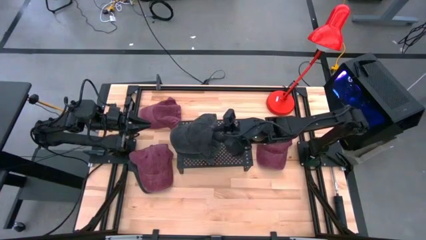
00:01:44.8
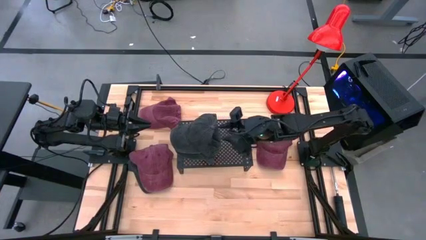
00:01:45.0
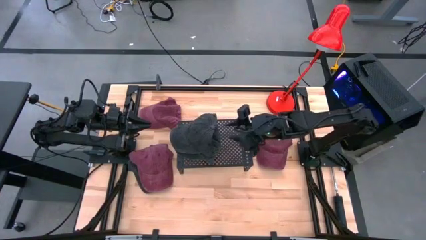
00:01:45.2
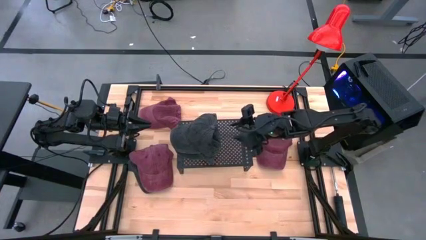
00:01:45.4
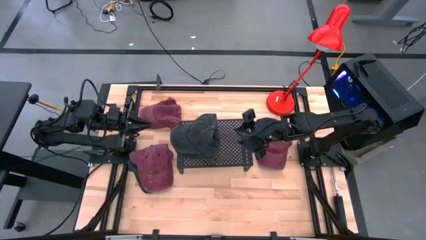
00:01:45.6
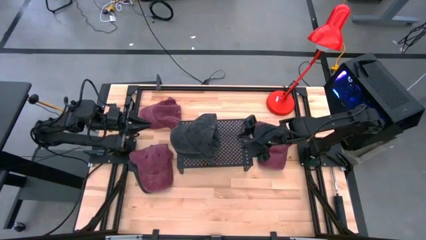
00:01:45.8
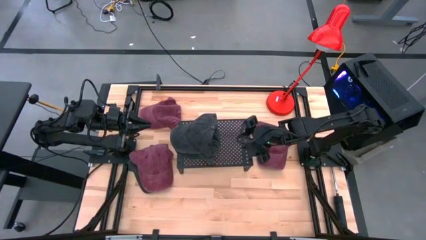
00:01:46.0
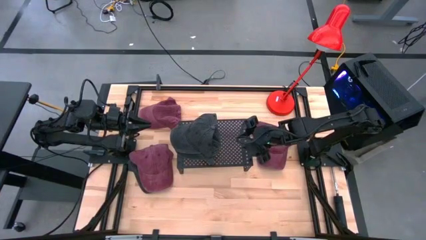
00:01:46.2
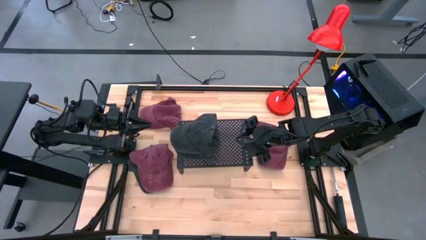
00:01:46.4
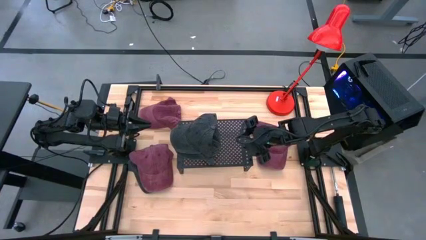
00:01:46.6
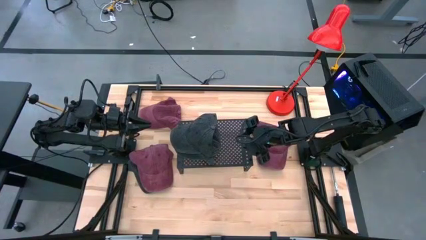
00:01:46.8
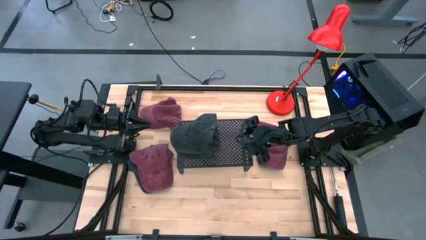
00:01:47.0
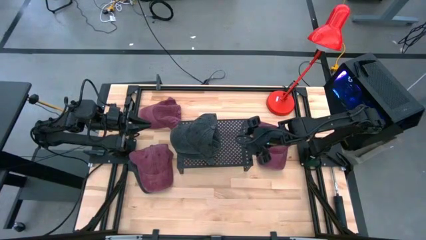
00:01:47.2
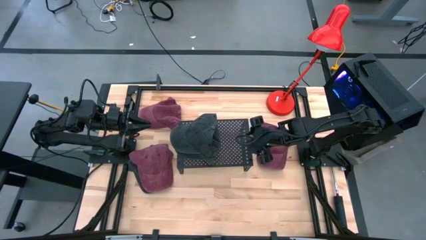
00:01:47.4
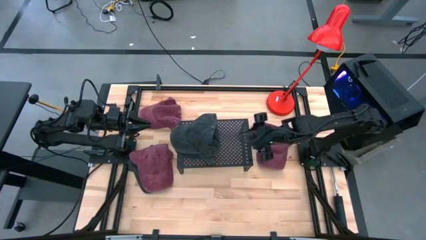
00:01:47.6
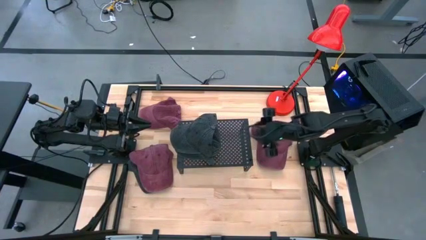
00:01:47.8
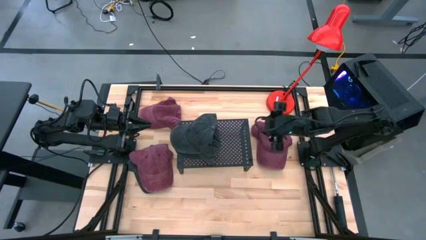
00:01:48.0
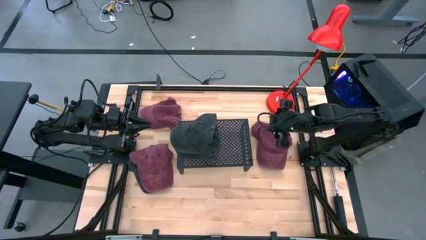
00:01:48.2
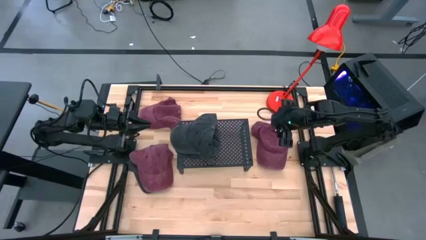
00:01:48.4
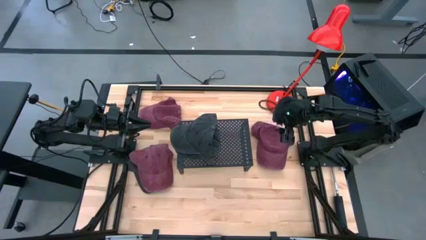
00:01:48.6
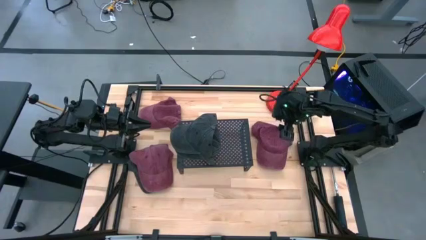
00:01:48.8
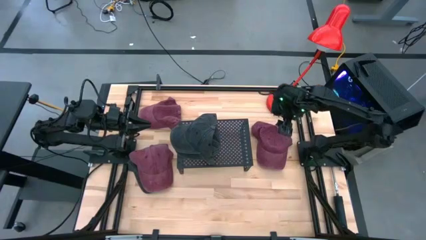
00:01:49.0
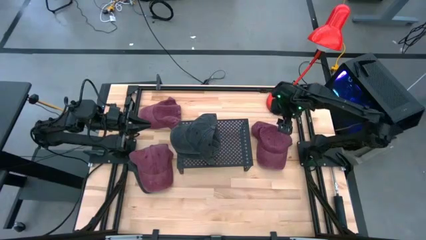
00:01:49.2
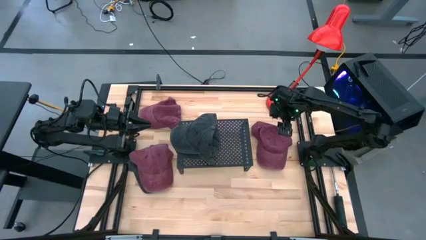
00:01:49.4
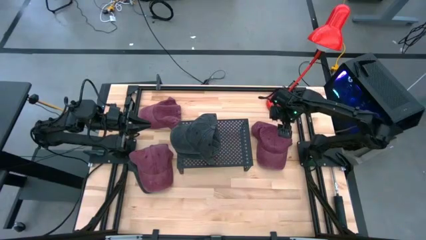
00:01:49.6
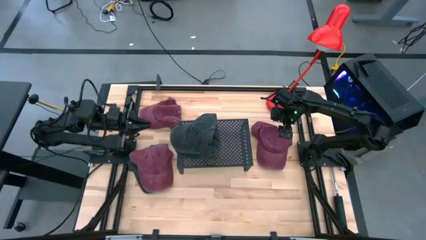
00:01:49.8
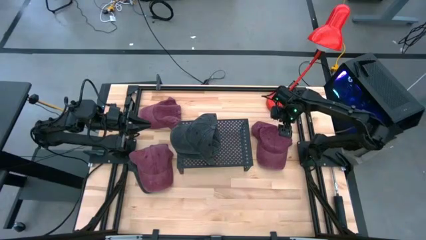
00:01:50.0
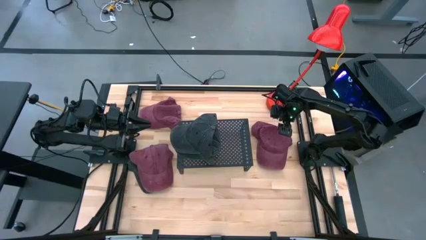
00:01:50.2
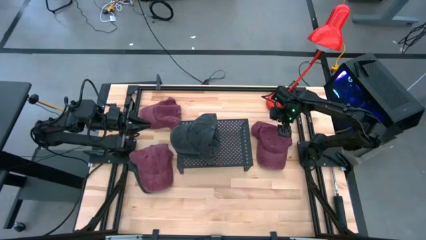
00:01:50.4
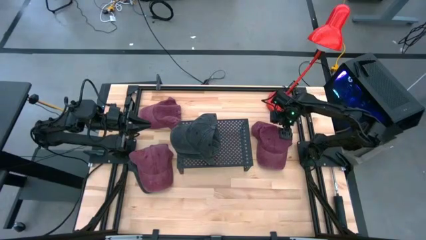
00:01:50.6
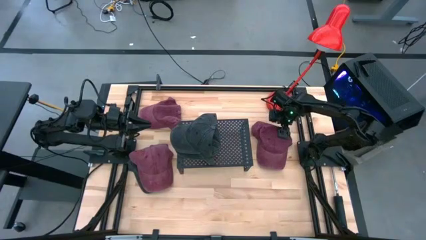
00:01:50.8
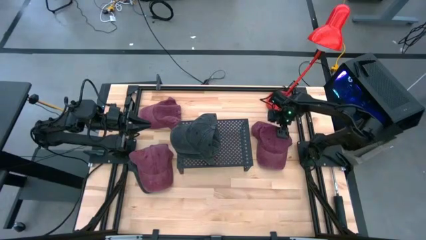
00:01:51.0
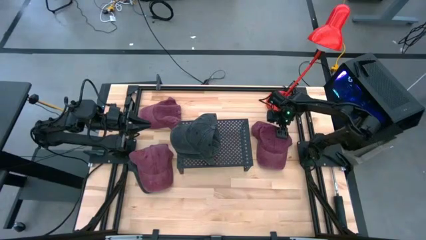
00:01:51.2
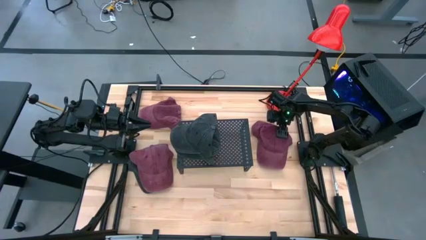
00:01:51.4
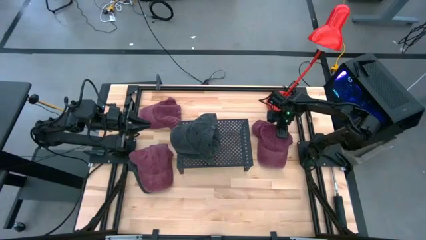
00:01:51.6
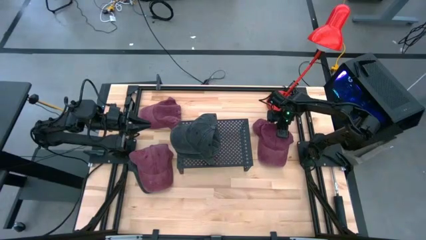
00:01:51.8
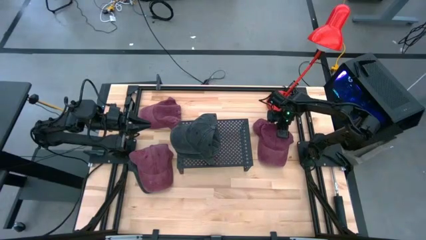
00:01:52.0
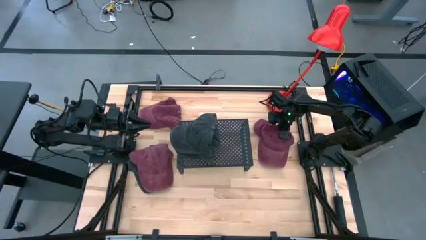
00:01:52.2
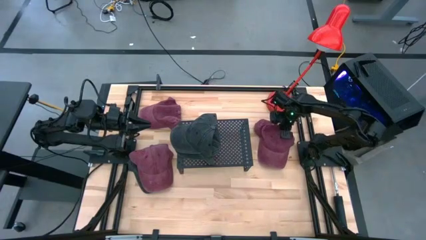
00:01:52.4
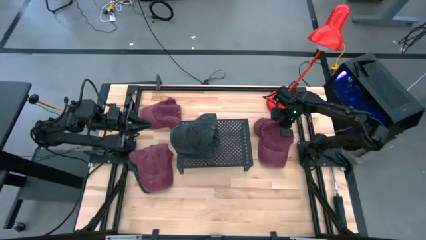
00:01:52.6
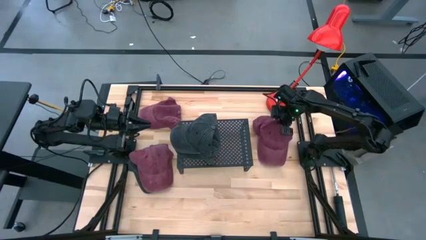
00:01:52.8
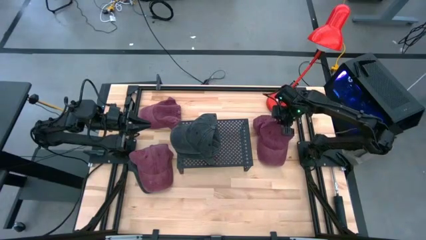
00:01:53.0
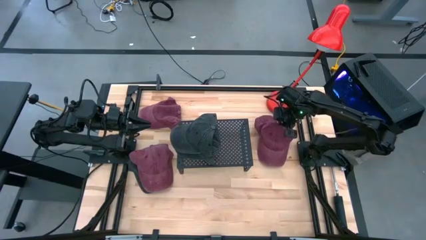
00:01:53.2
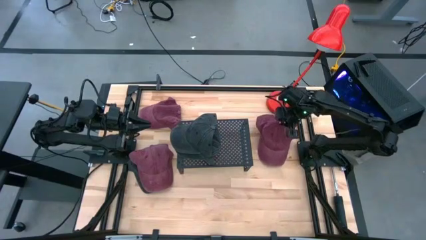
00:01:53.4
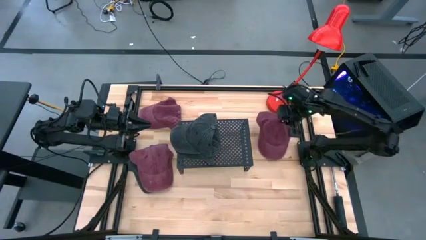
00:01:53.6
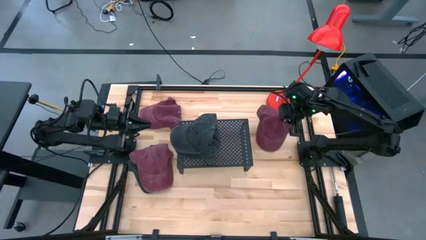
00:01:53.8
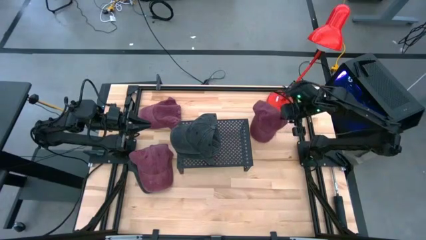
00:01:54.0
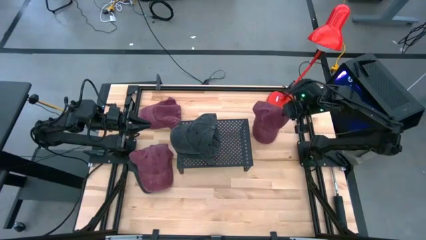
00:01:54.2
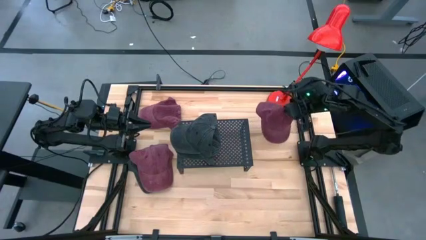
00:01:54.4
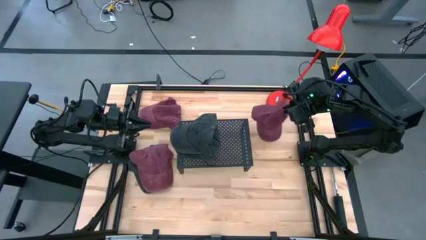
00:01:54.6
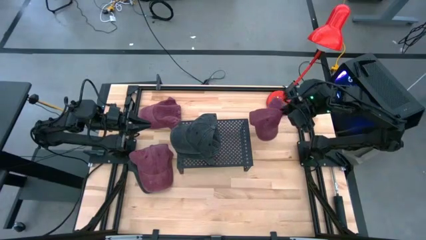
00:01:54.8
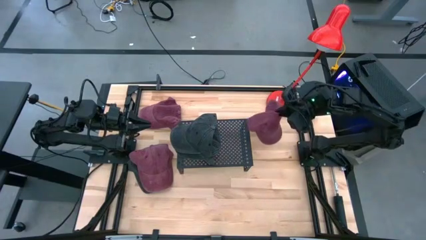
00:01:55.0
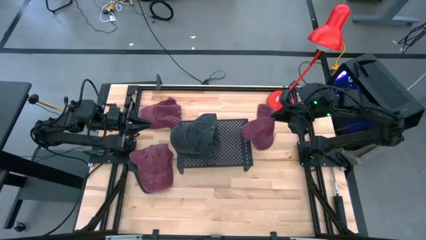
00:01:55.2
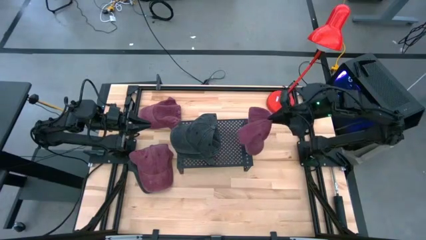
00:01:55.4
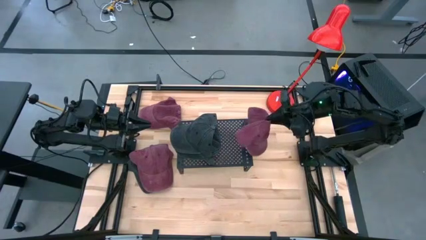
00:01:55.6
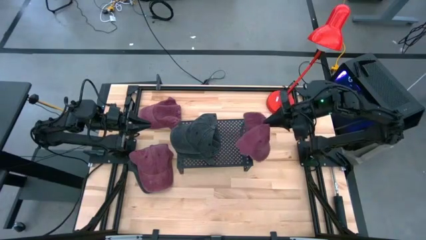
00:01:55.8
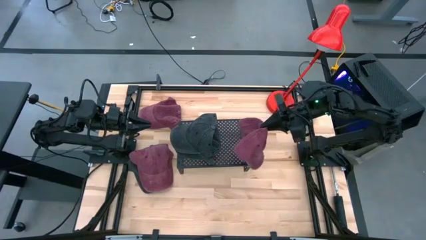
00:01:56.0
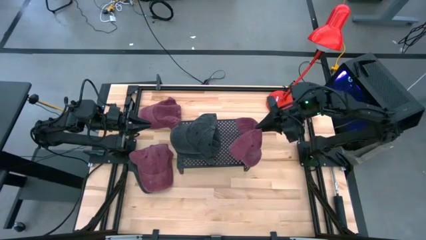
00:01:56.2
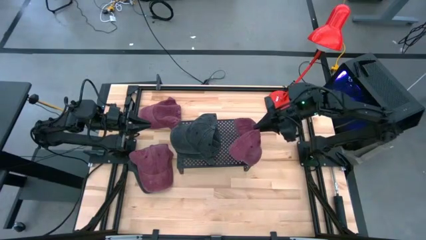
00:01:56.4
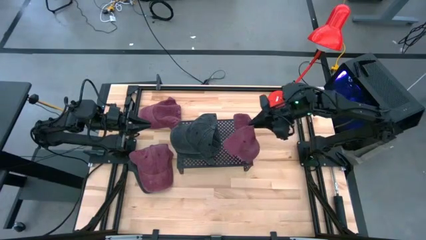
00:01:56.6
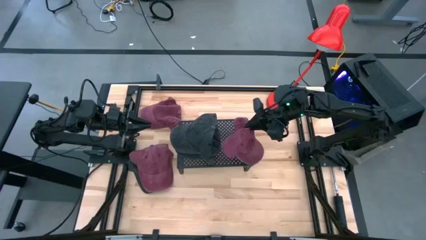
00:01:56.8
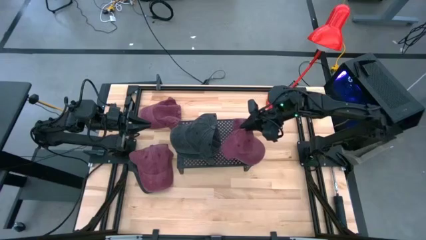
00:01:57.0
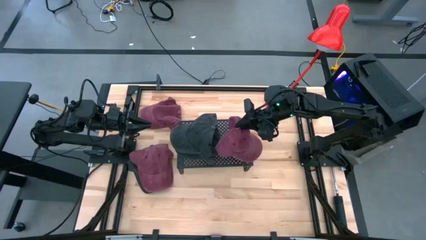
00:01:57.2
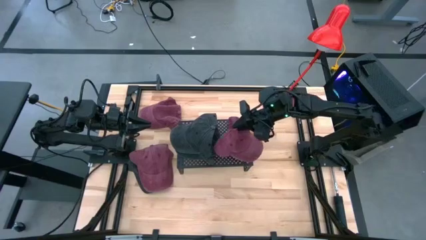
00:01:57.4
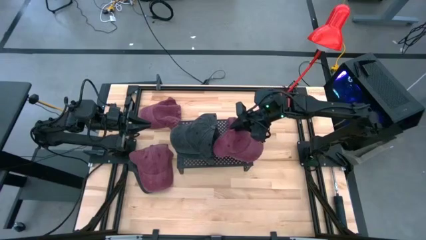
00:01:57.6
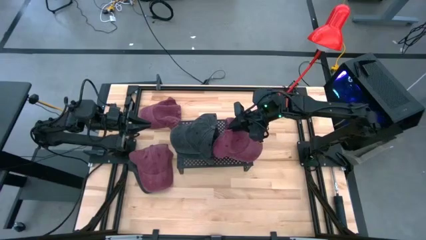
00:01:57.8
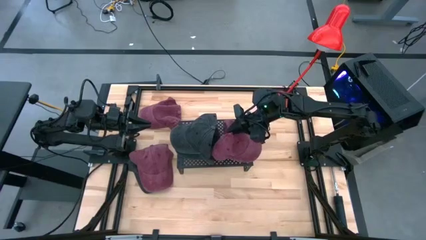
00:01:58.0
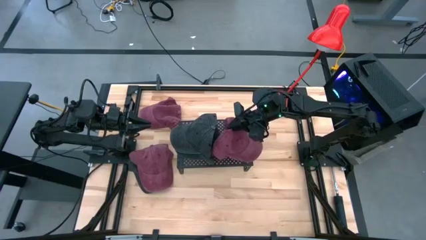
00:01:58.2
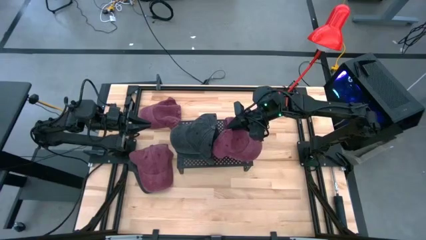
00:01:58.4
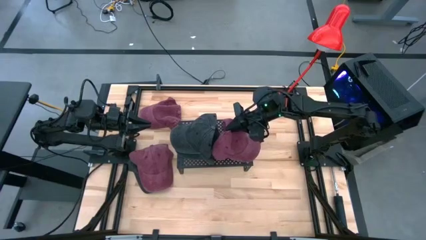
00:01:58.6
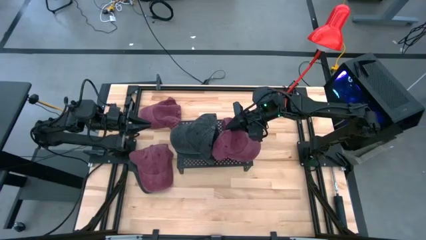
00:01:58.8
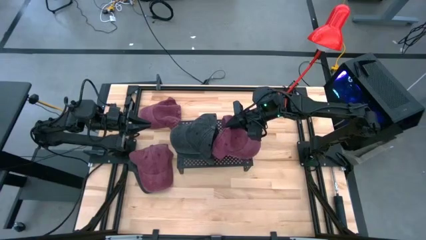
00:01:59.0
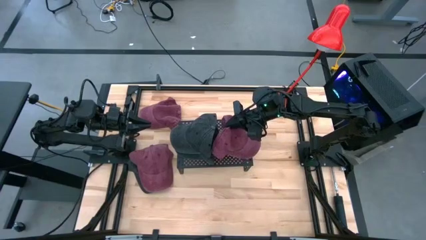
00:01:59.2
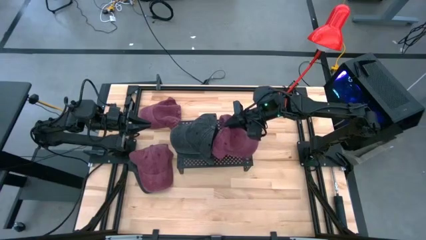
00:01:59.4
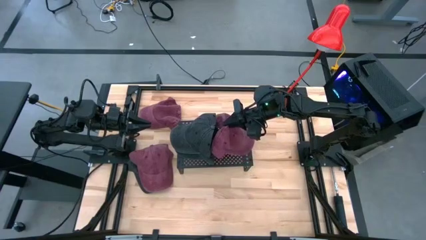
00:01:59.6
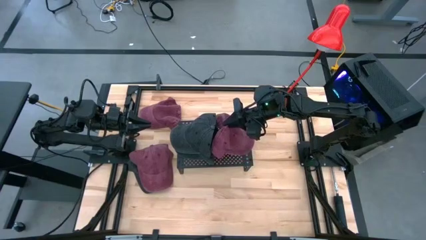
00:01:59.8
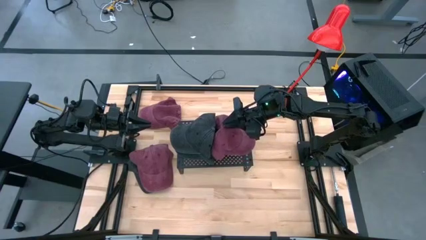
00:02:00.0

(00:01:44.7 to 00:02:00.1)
Task: Pick & Place hat
Put the right red cap on the shelf

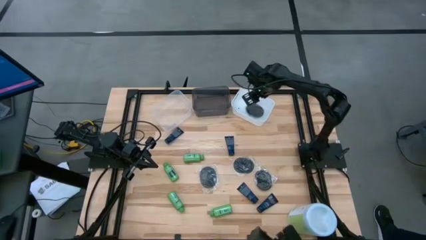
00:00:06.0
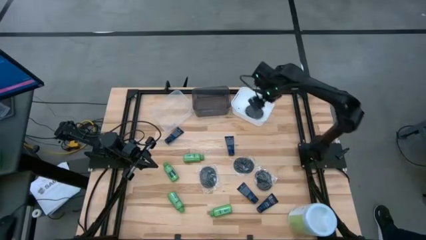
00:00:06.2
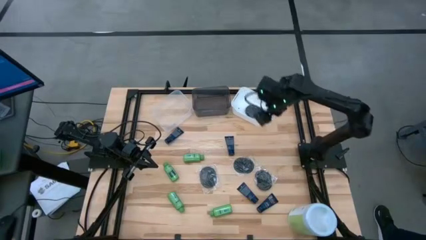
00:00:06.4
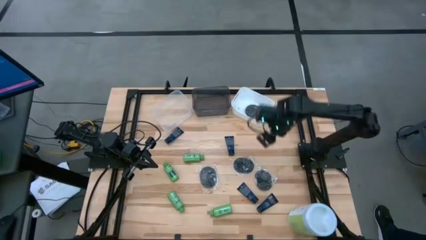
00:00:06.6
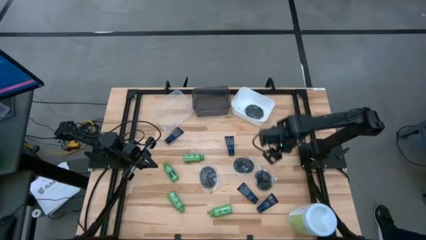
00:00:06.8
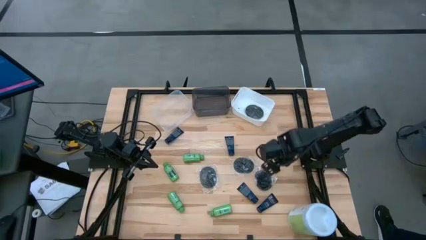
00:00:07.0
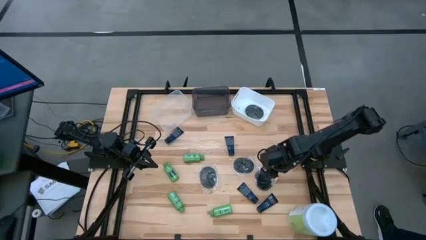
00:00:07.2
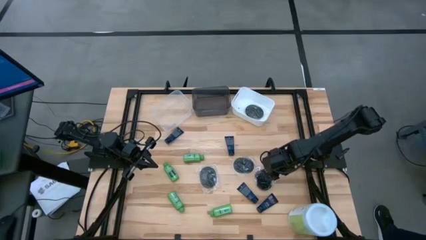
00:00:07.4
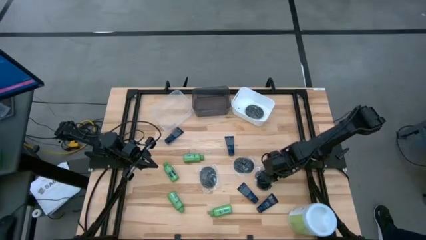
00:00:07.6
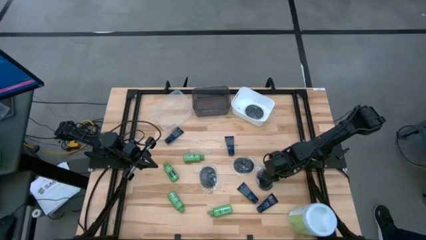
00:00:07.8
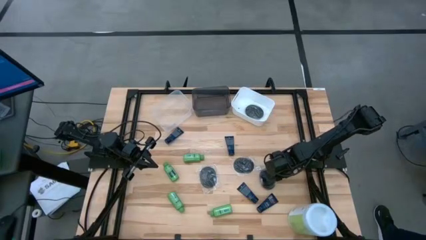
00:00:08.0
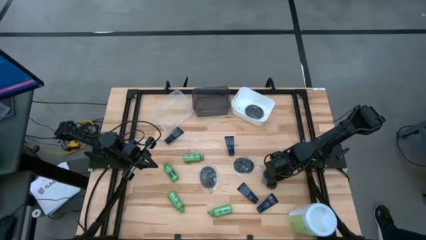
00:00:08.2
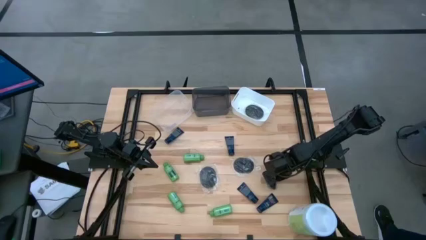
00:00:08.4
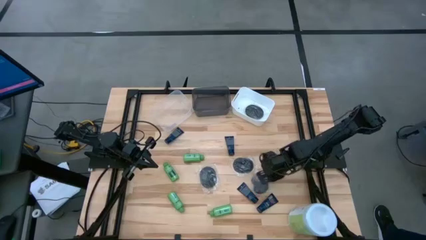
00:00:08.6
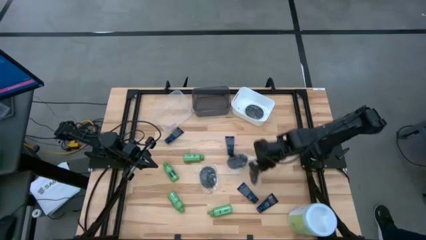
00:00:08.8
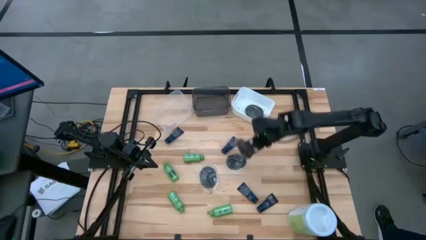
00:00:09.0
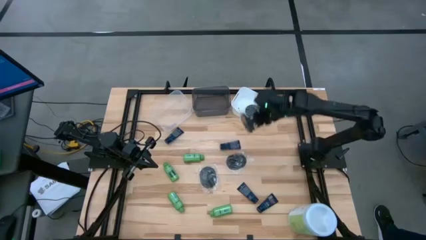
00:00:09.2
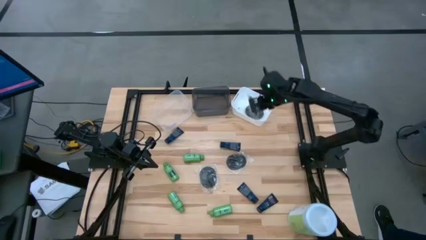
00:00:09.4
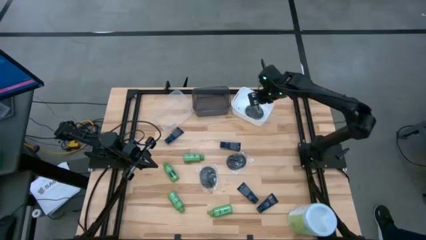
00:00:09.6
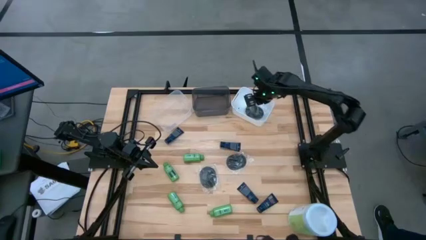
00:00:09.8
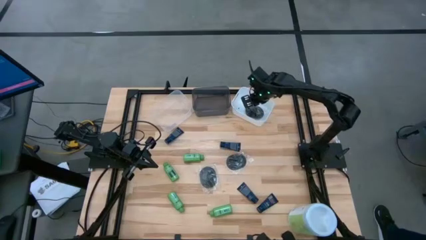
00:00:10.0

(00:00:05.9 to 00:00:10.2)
Task: Pick & Place Travel size toiletries
Put the black hairbrush into the white bin
